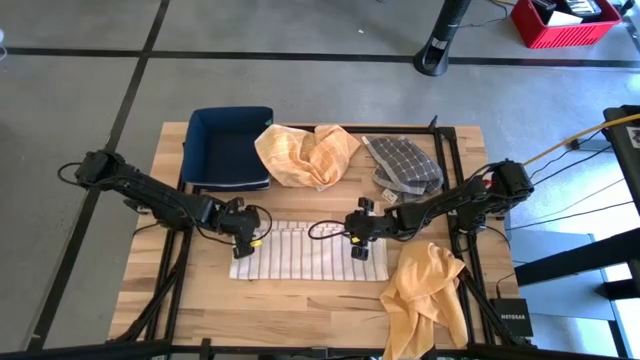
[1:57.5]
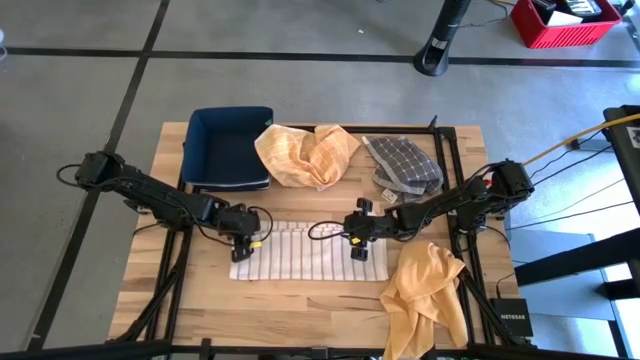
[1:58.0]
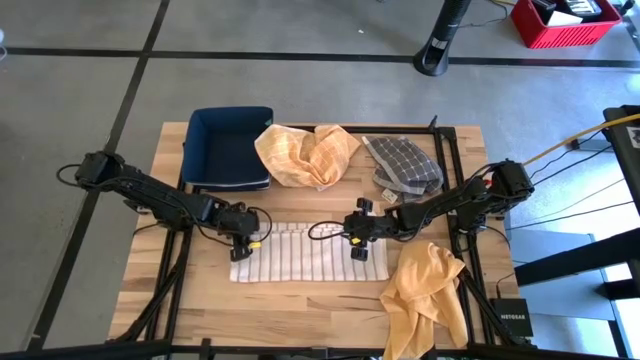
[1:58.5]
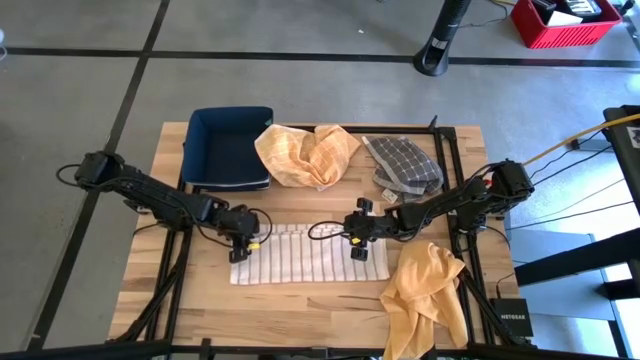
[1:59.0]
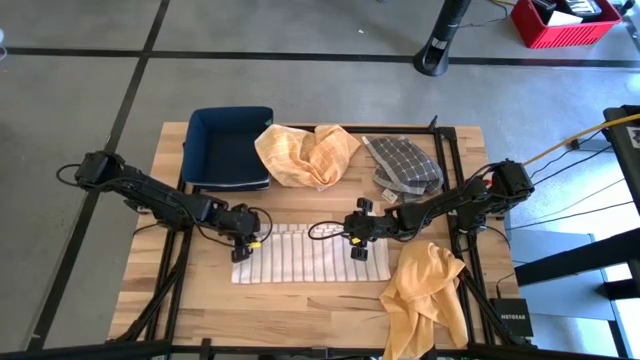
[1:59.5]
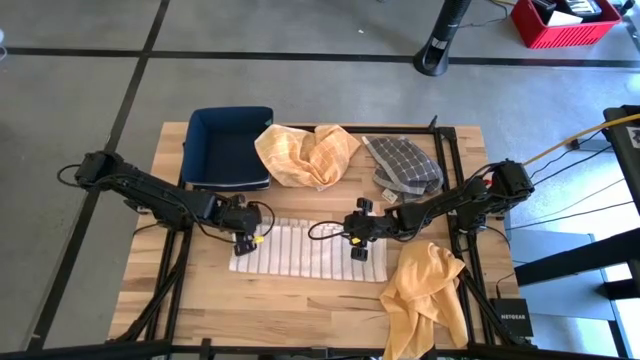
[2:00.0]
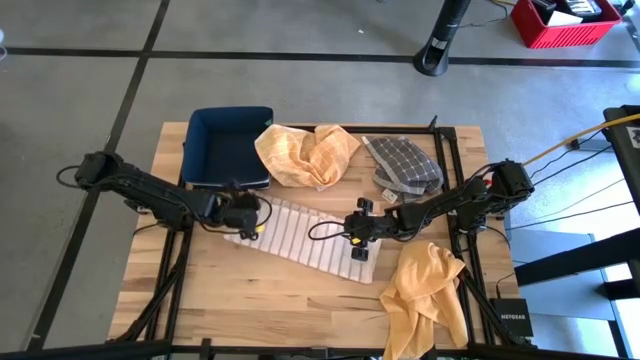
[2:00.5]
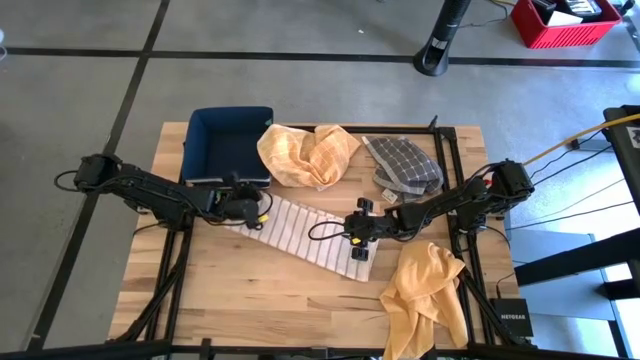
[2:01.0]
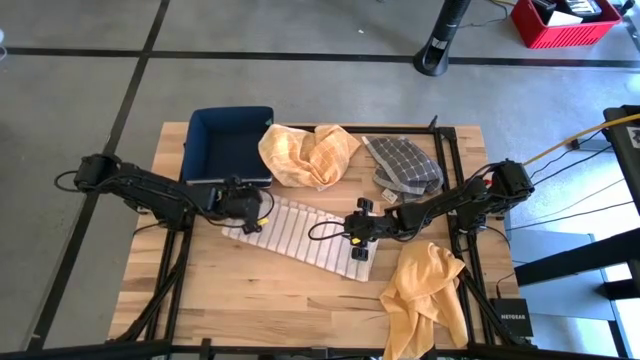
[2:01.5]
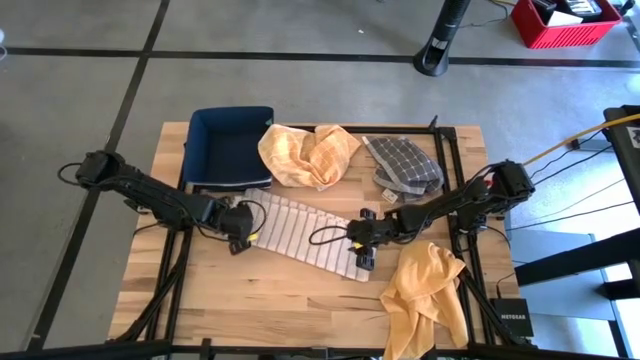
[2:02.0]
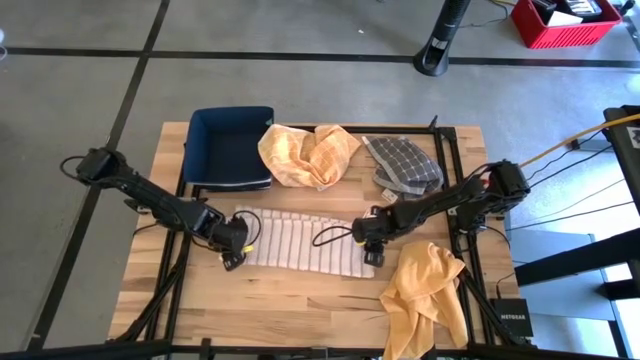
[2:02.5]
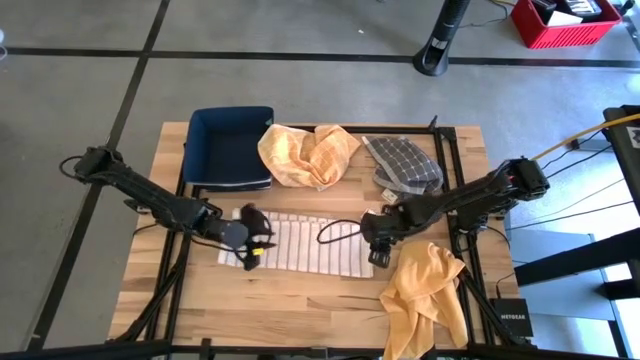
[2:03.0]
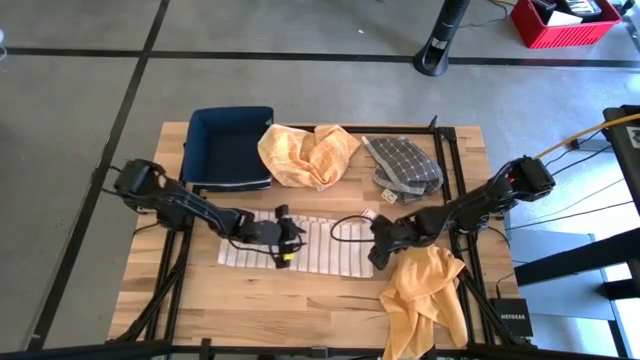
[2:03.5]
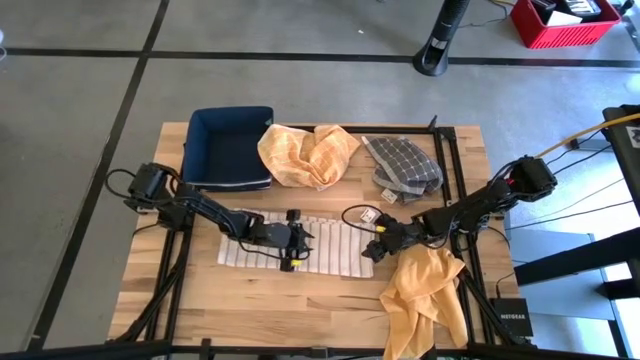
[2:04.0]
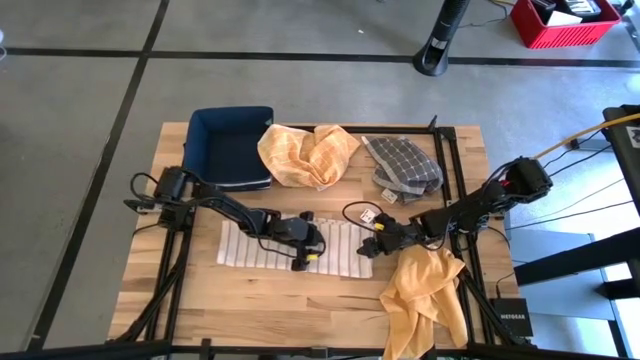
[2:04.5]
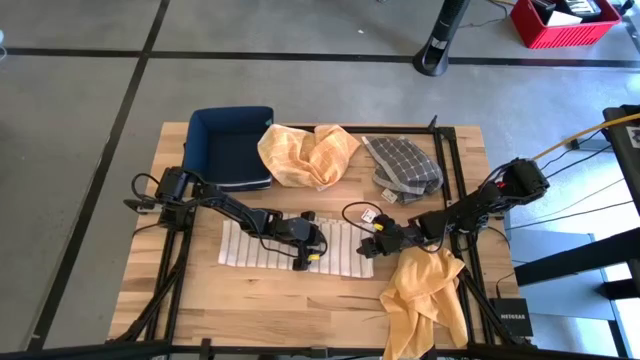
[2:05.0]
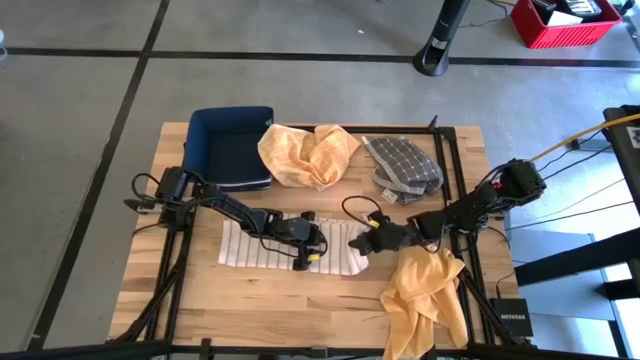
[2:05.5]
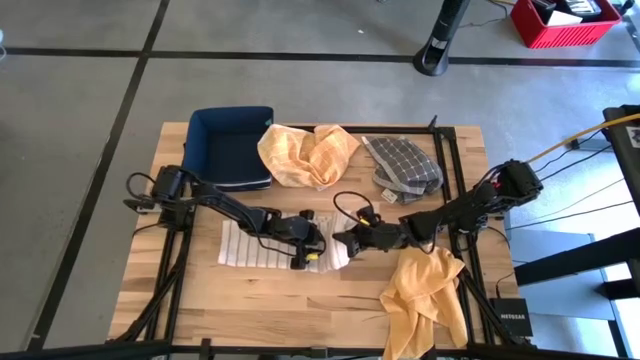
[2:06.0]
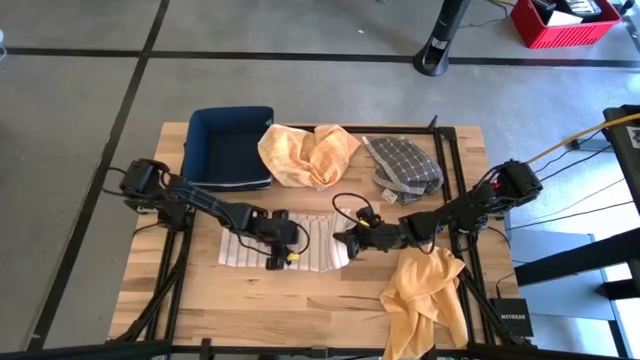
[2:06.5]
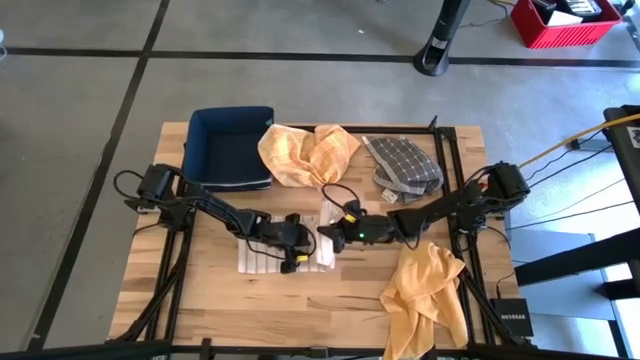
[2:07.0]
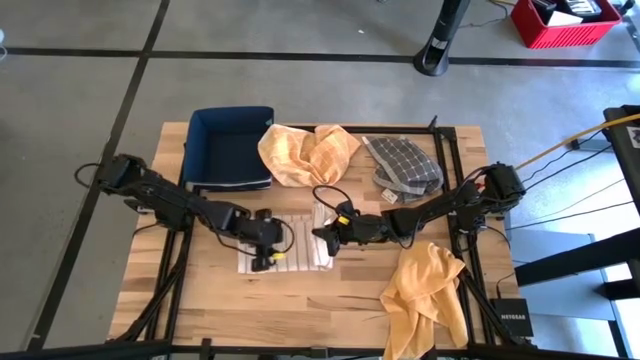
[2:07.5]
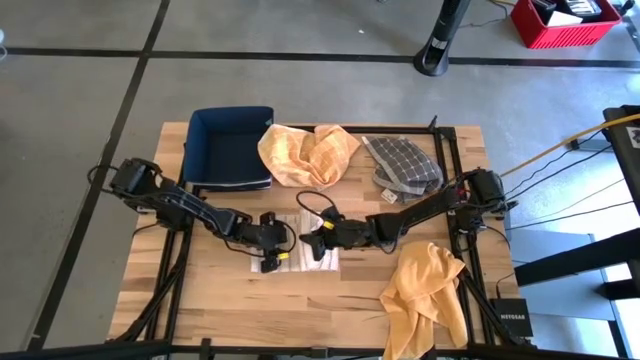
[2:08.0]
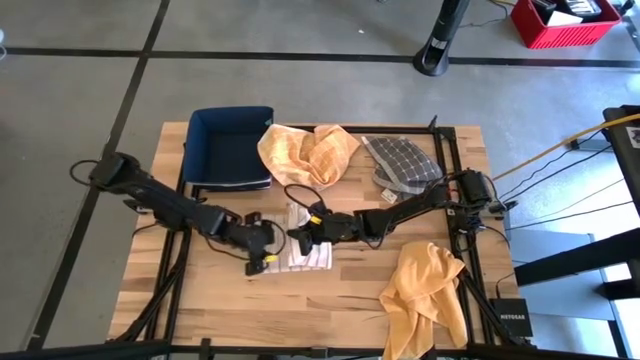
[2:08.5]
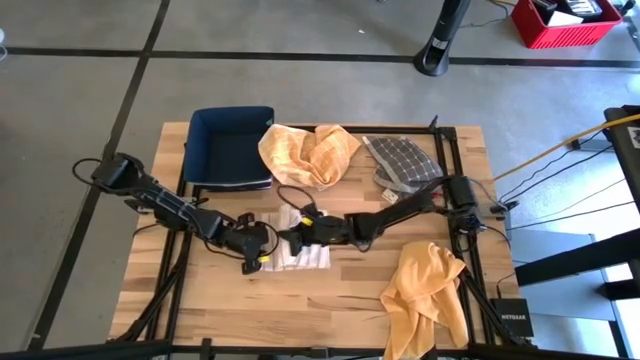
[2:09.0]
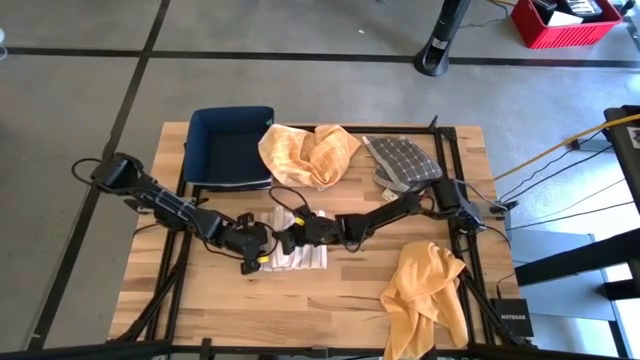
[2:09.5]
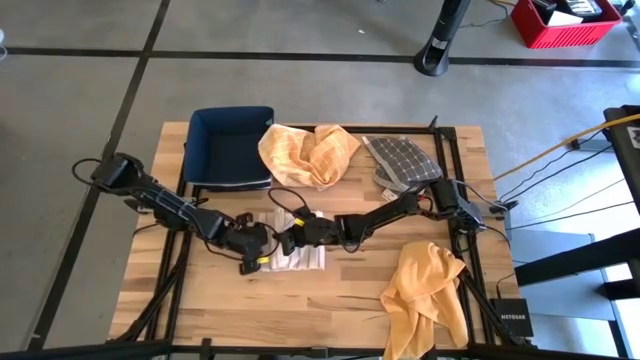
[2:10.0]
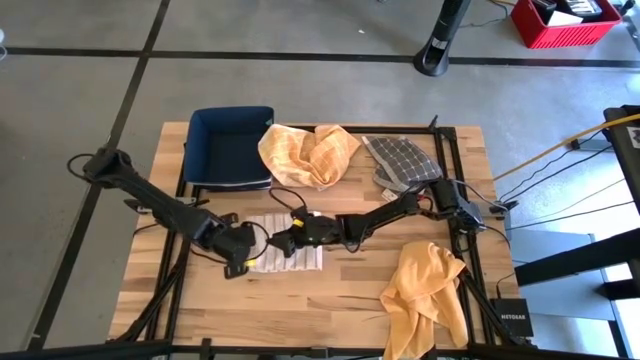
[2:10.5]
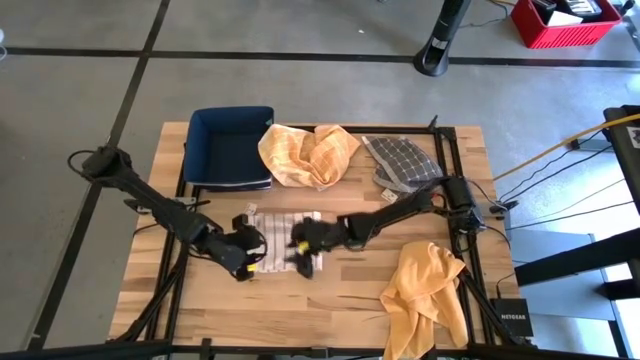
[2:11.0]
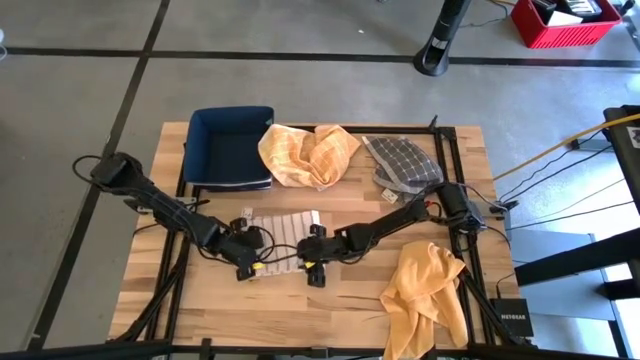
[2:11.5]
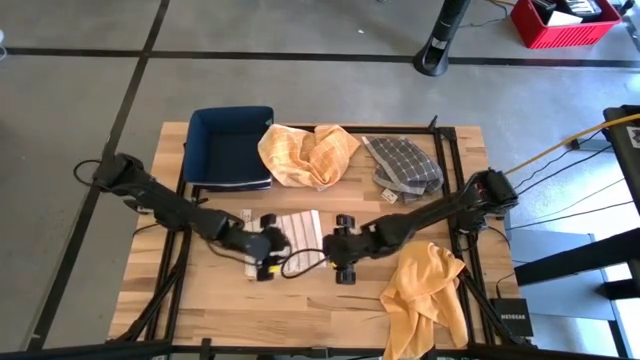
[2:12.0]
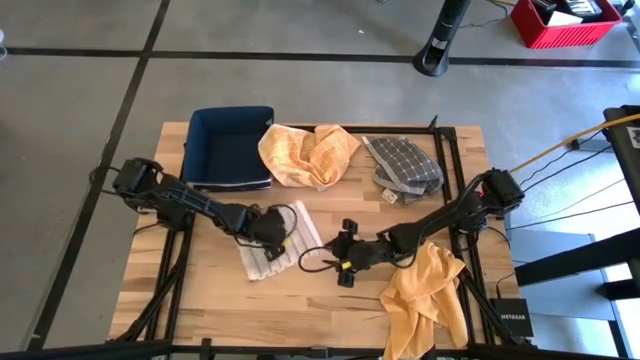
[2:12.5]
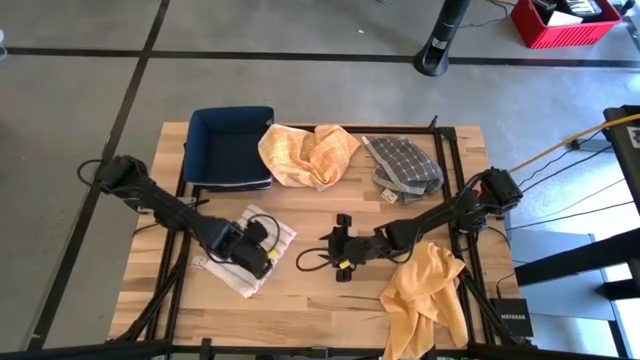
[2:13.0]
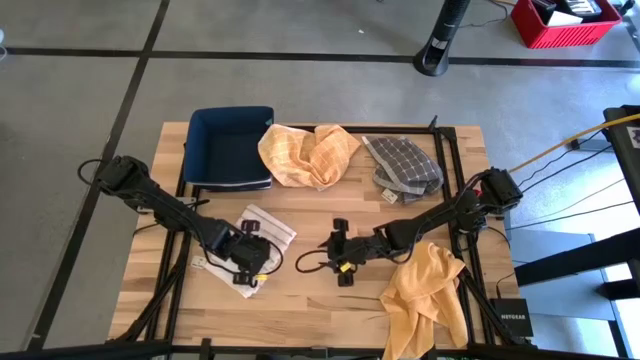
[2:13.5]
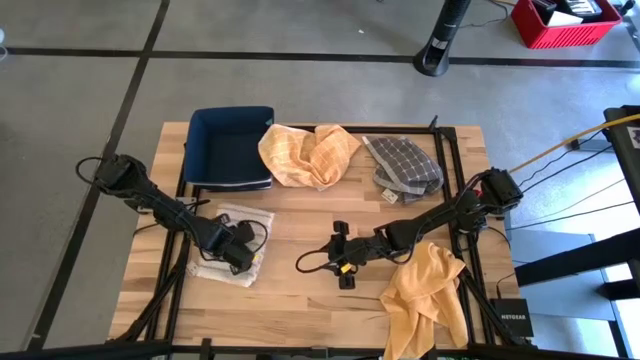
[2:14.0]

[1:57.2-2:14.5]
Task: Fold towel
Fold the white towel

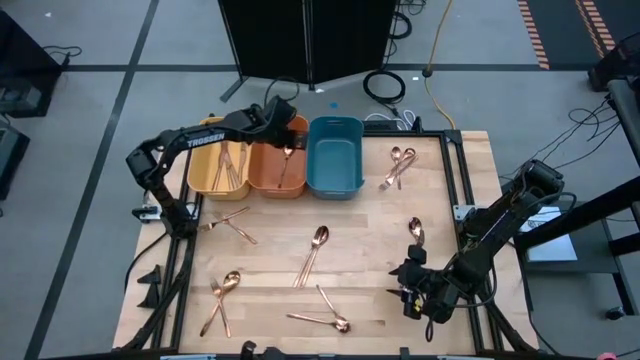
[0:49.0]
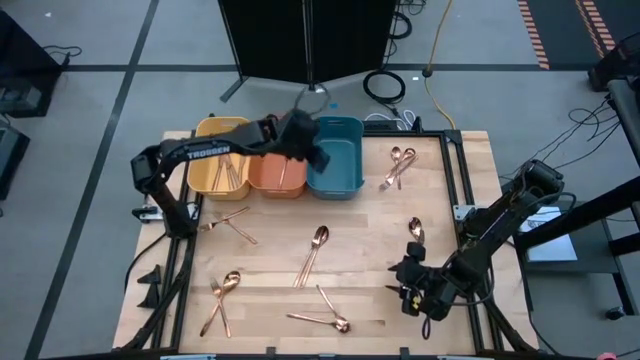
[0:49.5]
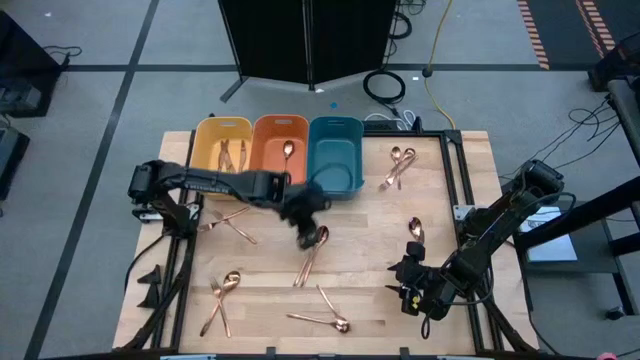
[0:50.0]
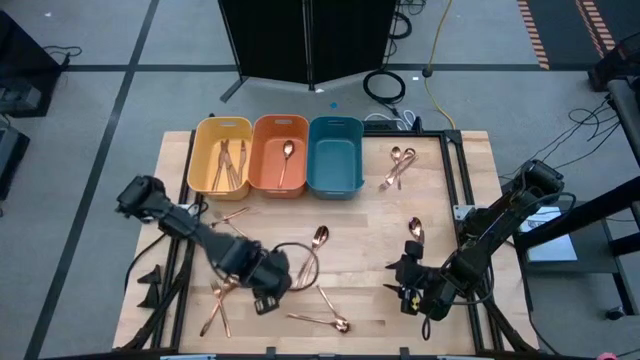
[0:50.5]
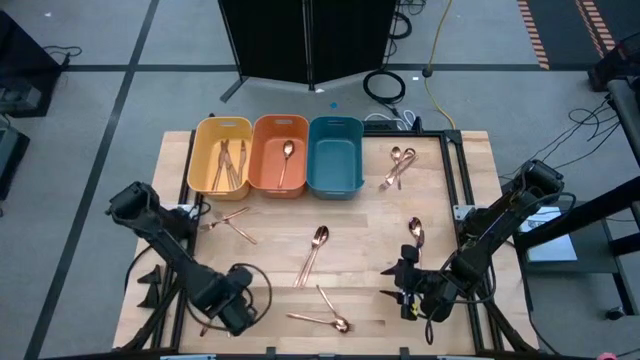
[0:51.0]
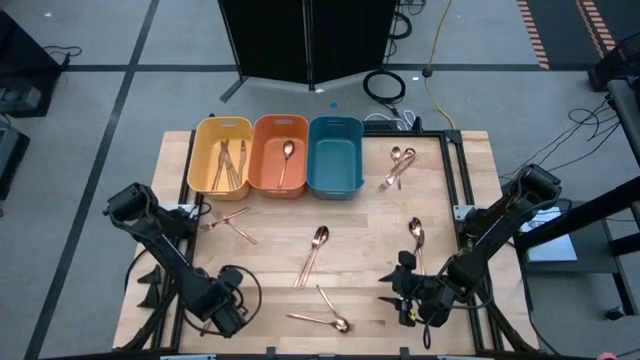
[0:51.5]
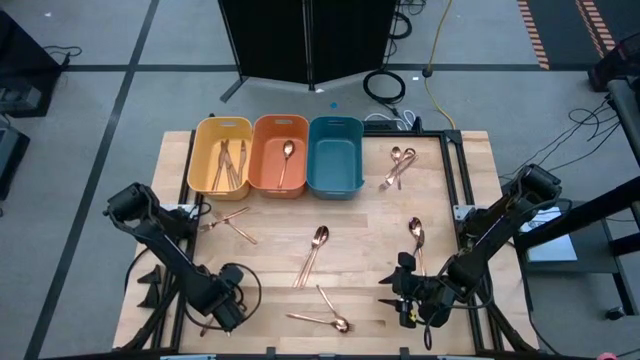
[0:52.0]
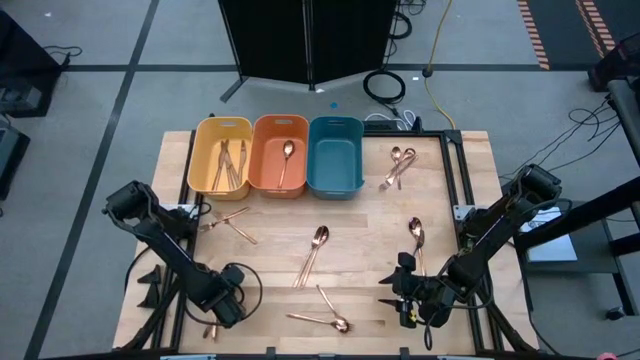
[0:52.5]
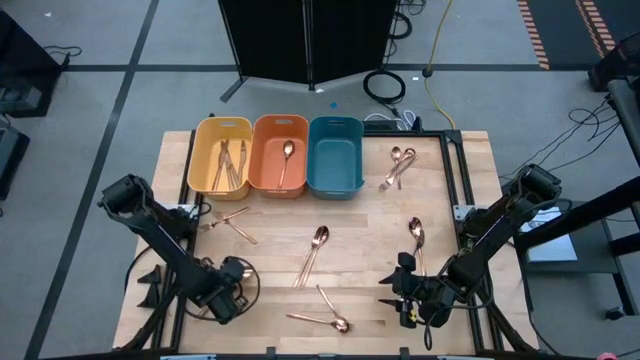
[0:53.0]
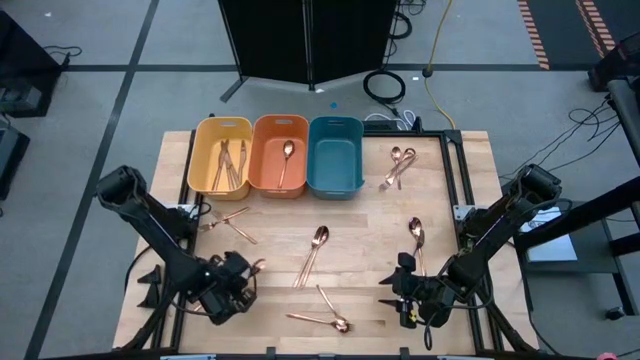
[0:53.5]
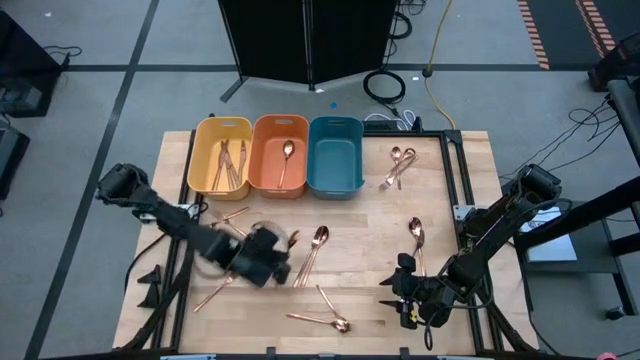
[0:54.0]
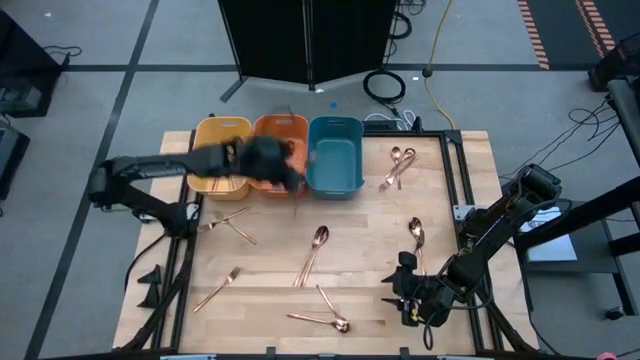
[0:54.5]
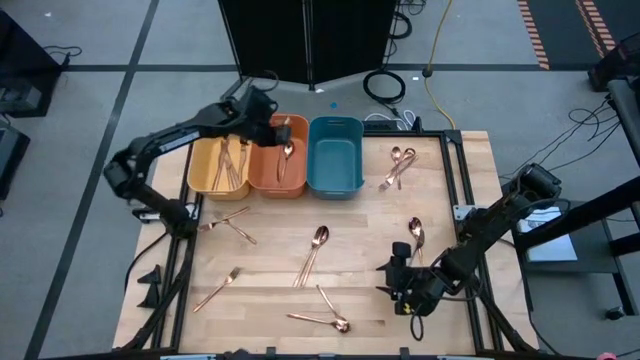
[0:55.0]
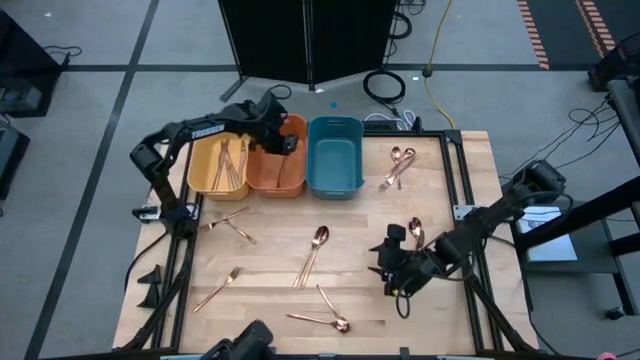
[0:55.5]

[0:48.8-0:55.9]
Task: Sort silverware
Put the gold spoon into the orange bin
